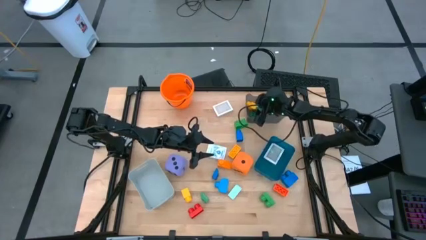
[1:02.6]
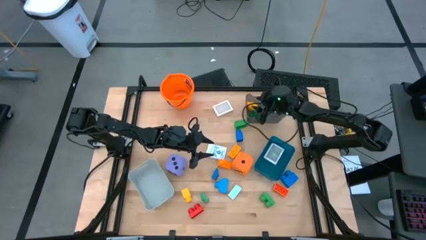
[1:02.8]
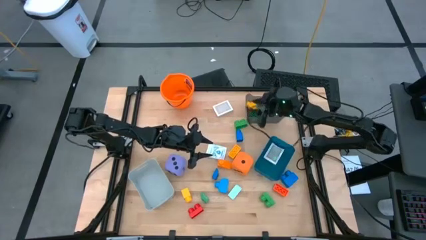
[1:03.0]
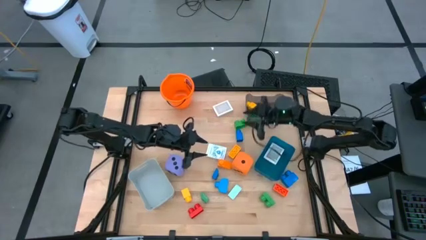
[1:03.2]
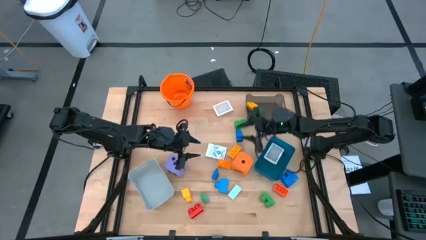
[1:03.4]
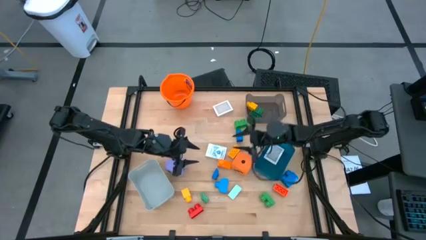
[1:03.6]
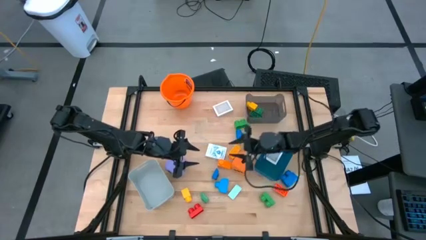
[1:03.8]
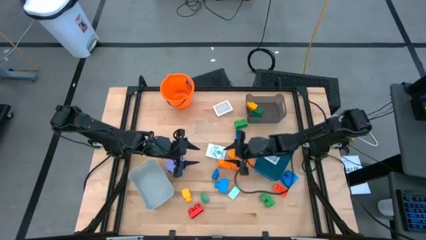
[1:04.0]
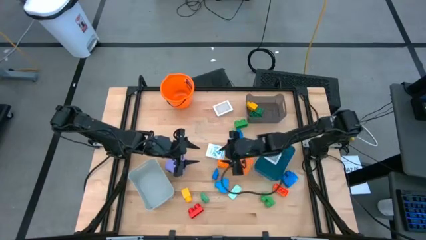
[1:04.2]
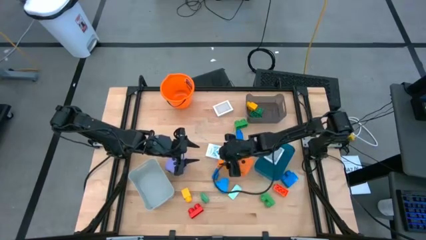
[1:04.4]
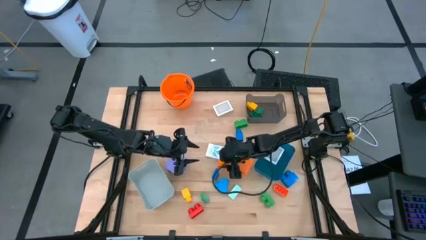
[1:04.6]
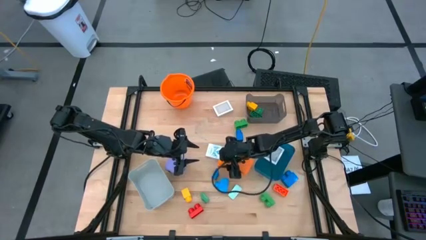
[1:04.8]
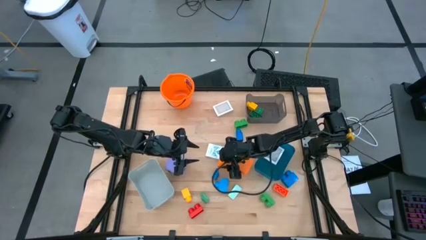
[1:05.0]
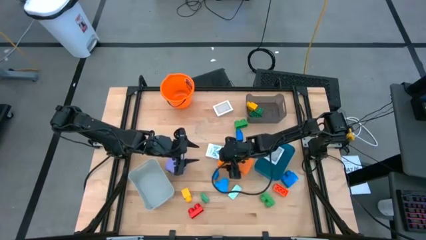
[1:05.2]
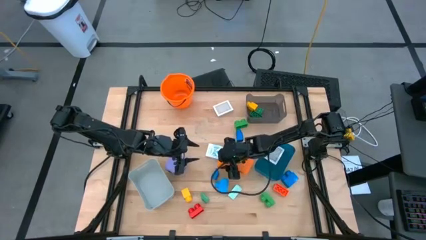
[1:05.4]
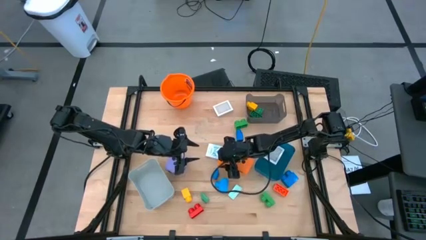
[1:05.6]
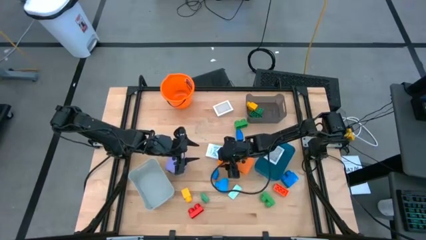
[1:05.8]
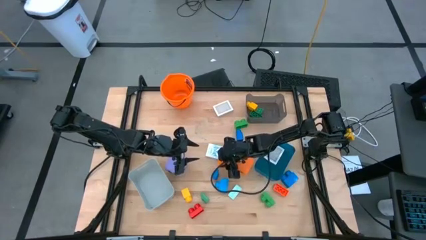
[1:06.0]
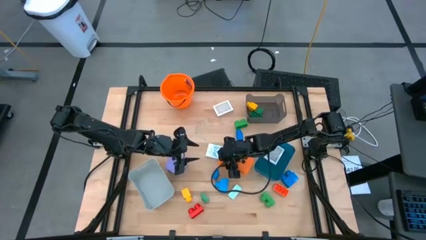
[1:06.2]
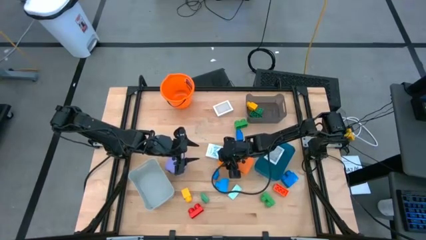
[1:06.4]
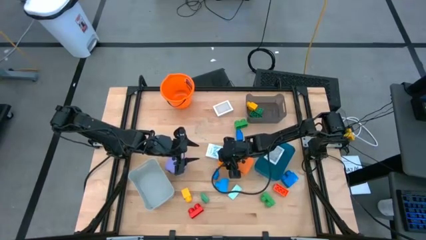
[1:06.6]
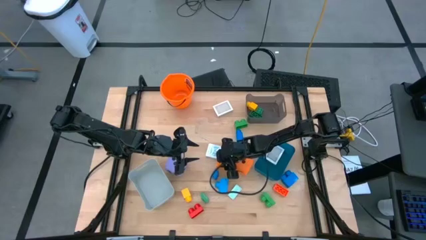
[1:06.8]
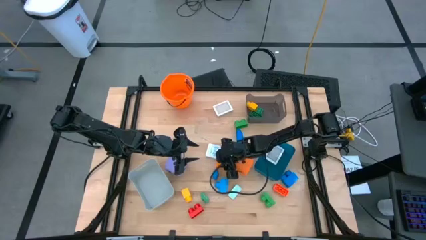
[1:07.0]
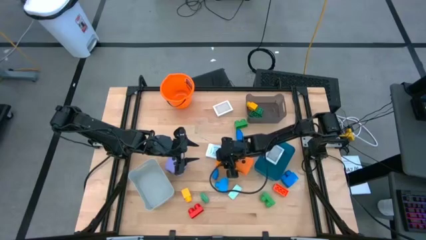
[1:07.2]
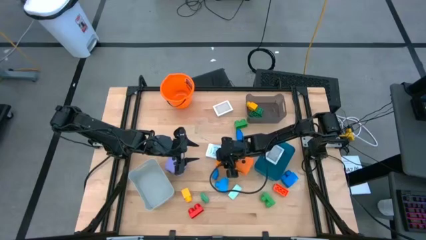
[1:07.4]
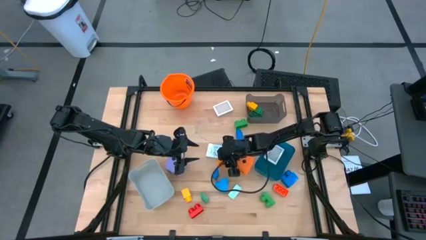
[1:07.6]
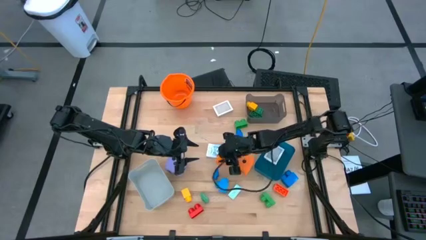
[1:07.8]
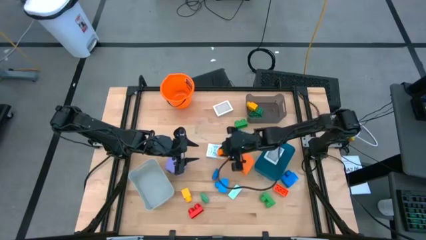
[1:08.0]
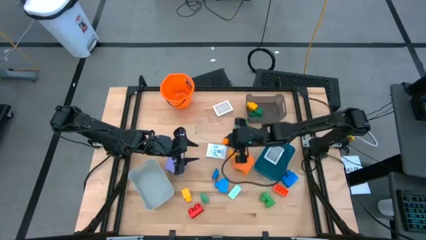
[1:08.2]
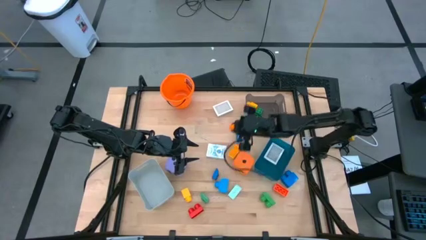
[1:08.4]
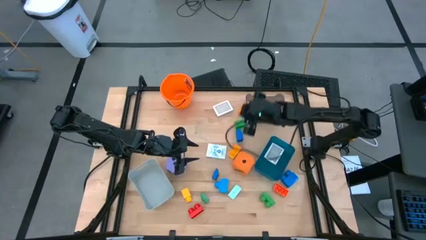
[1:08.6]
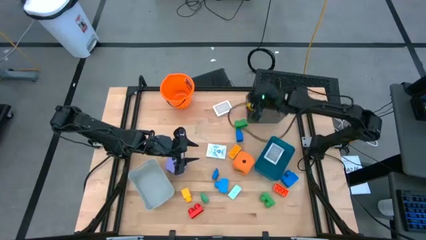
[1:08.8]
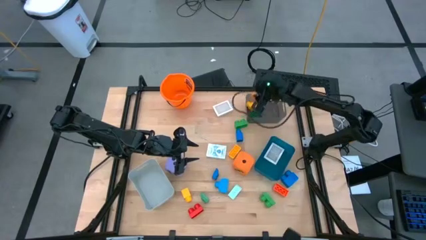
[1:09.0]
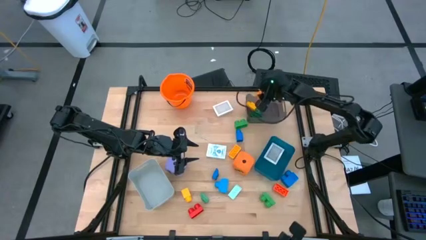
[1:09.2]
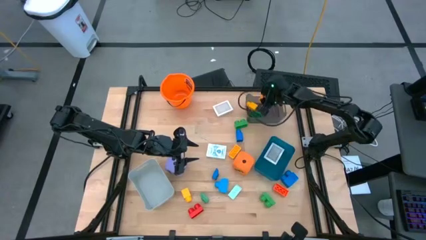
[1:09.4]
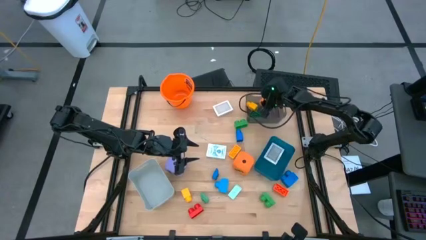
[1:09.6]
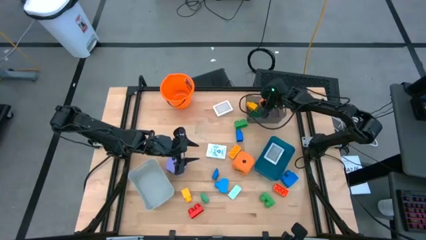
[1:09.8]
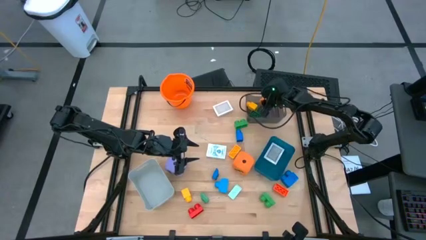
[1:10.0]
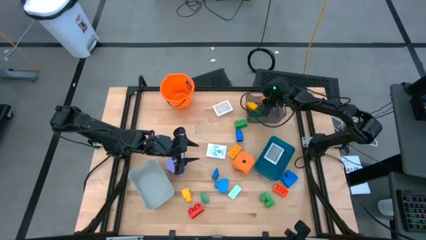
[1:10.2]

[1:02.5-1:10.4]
Task: Pick & Place Toys
Put the orange game piece into the black bin
